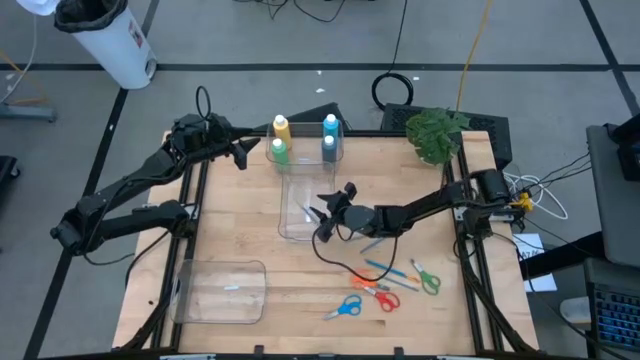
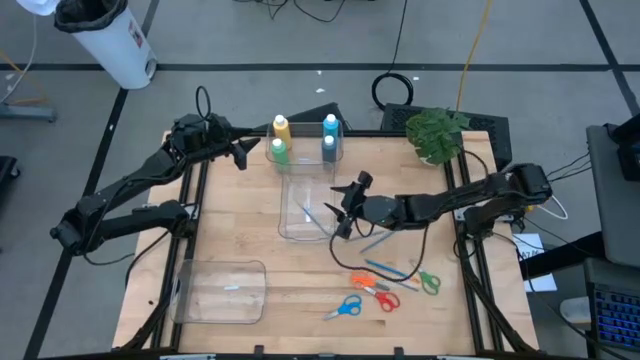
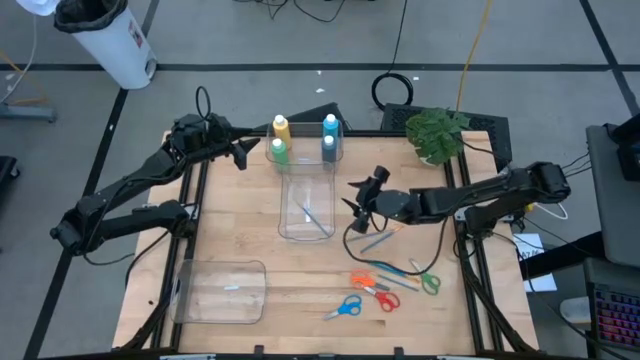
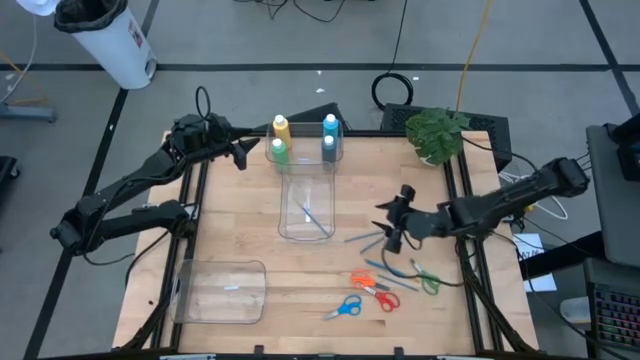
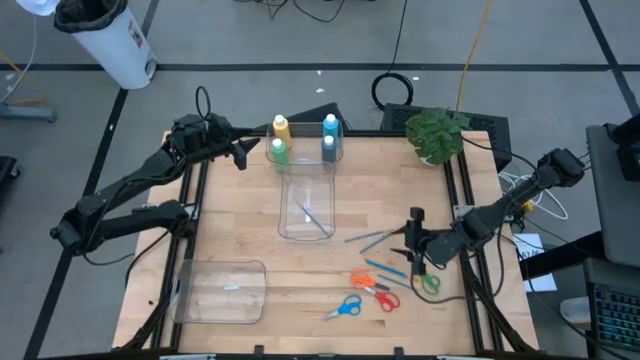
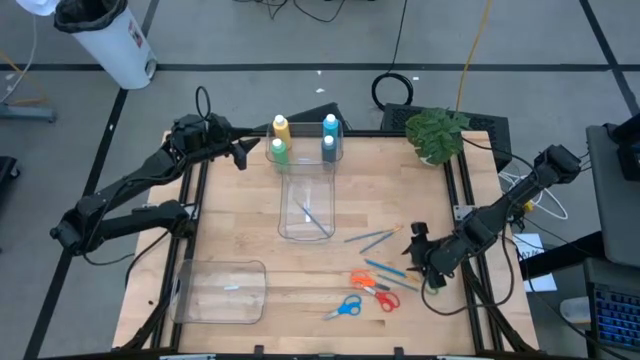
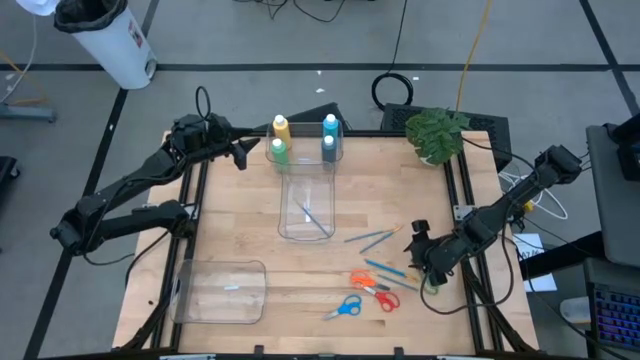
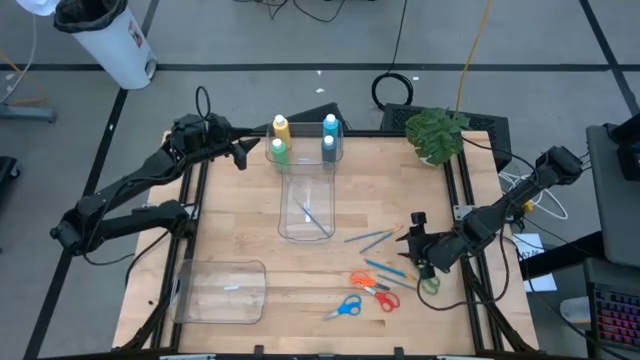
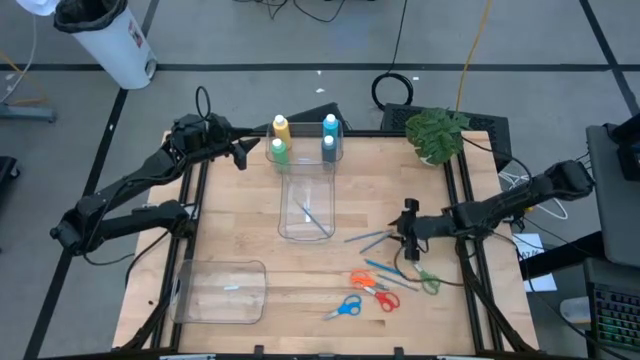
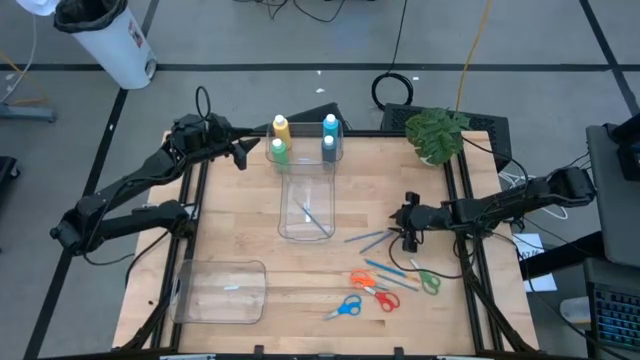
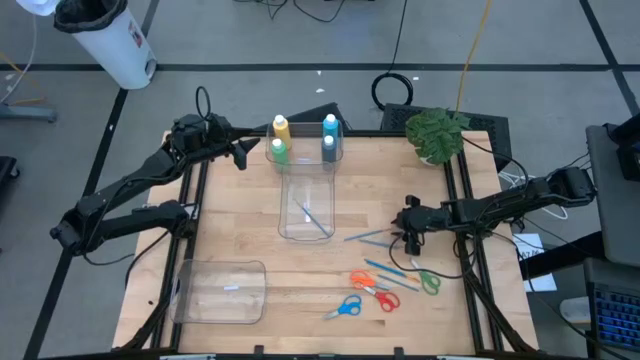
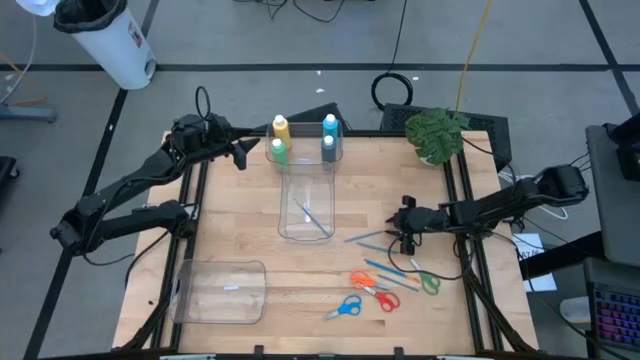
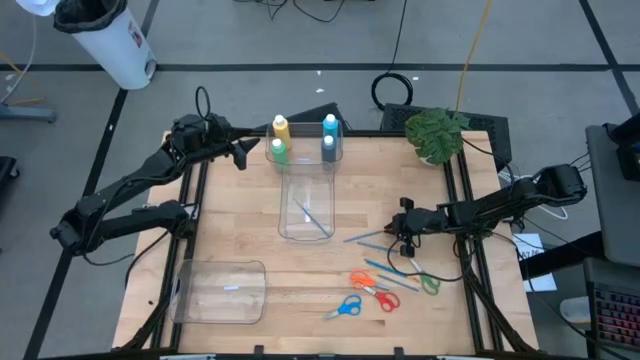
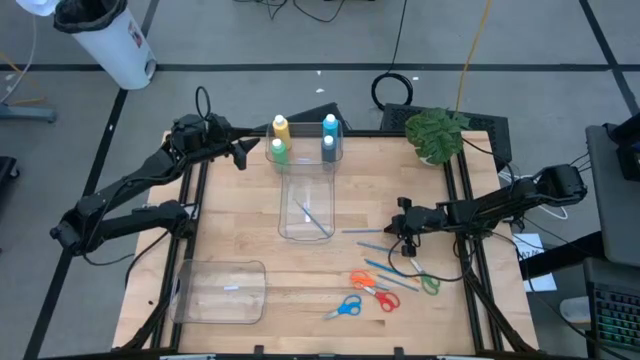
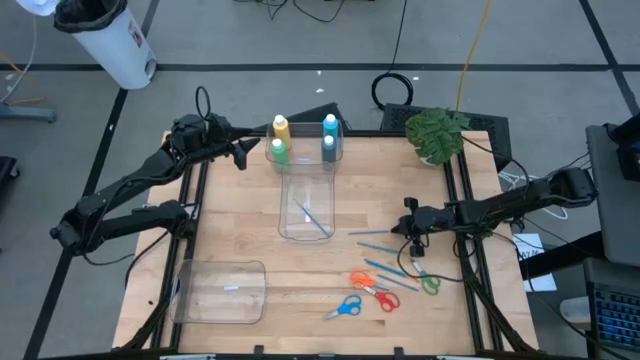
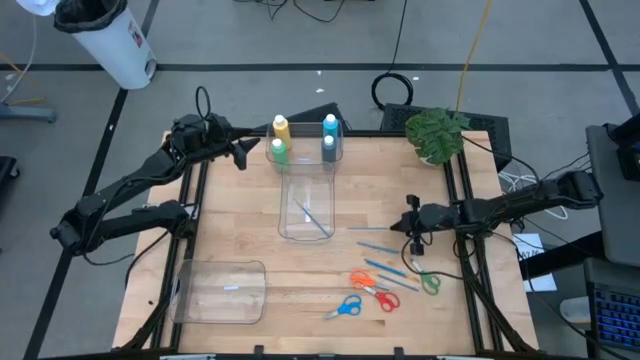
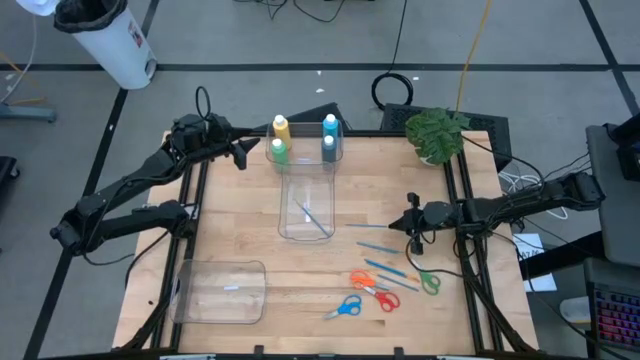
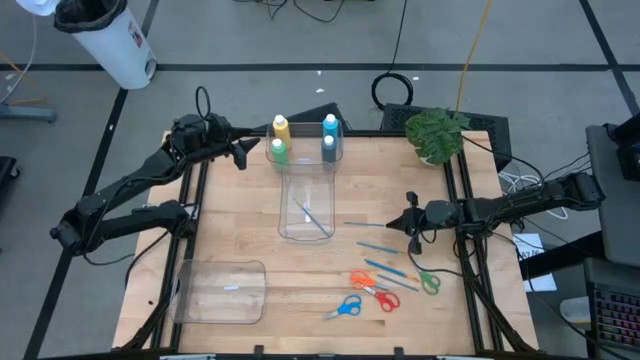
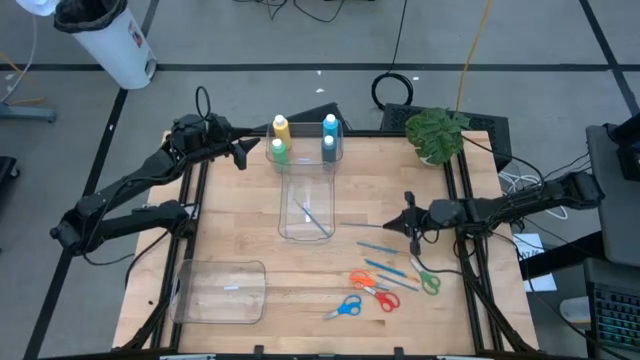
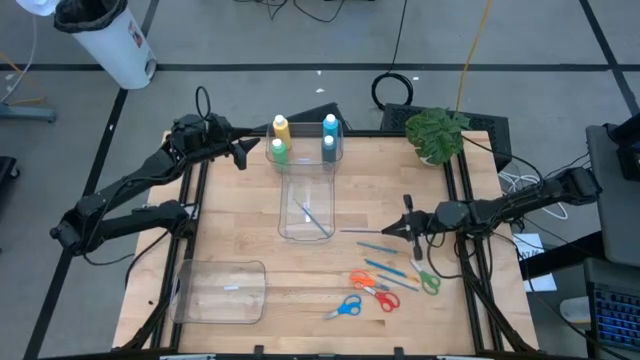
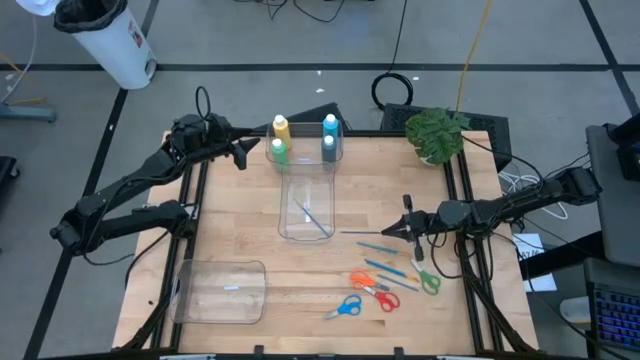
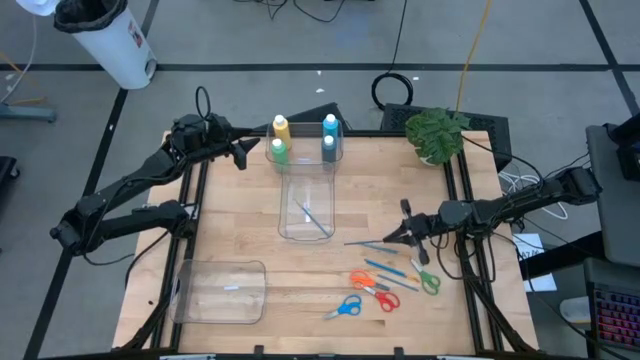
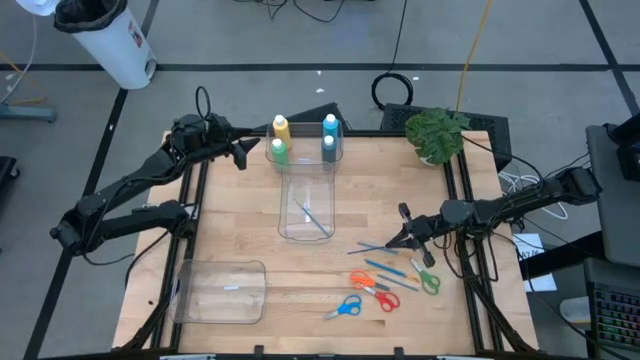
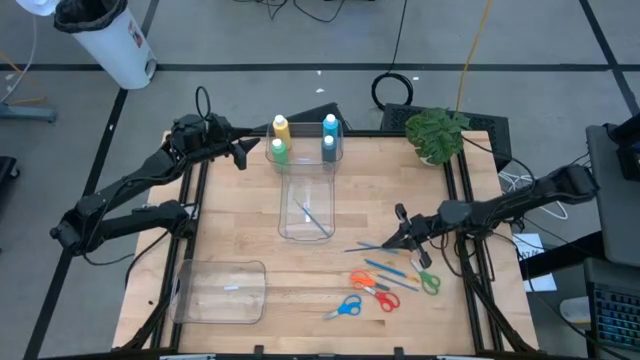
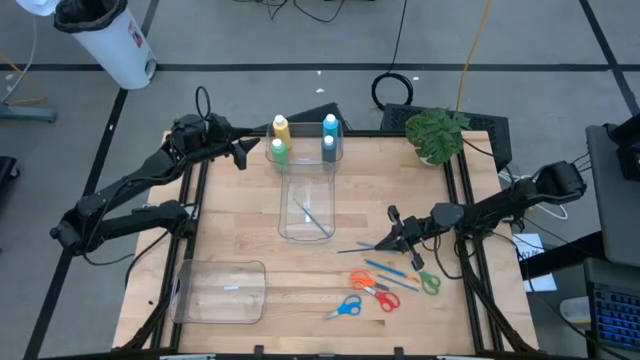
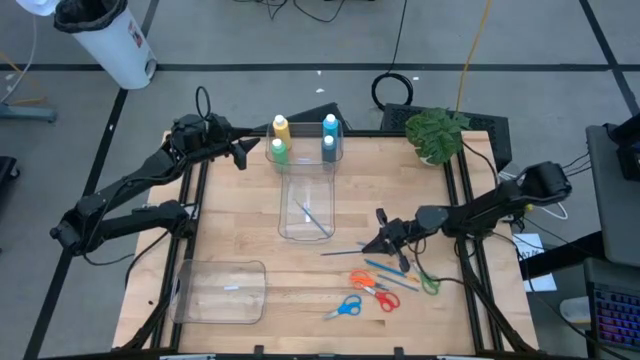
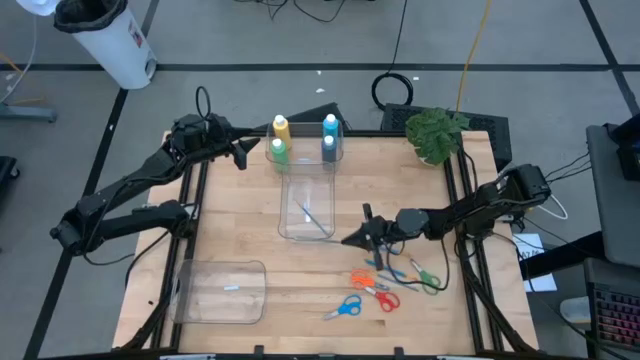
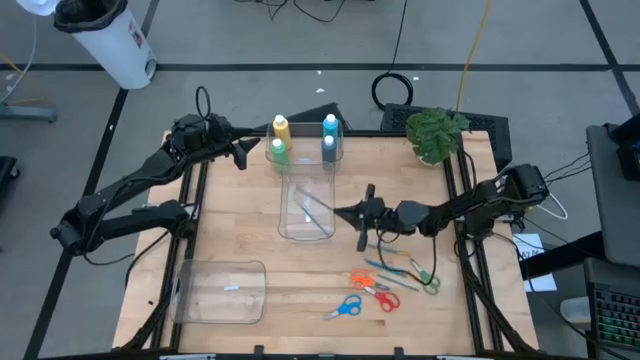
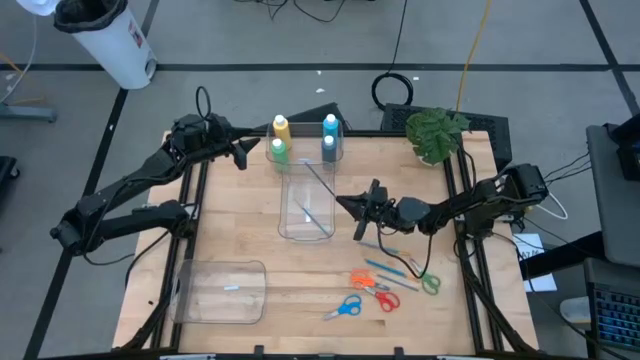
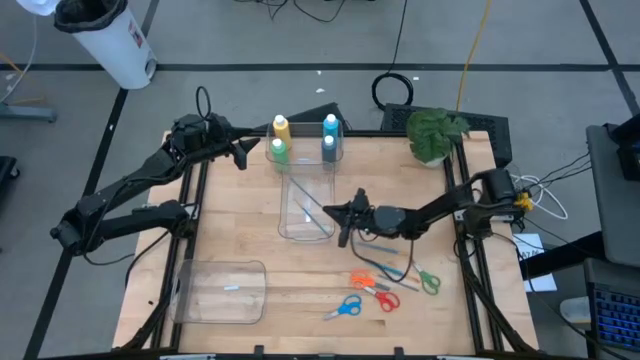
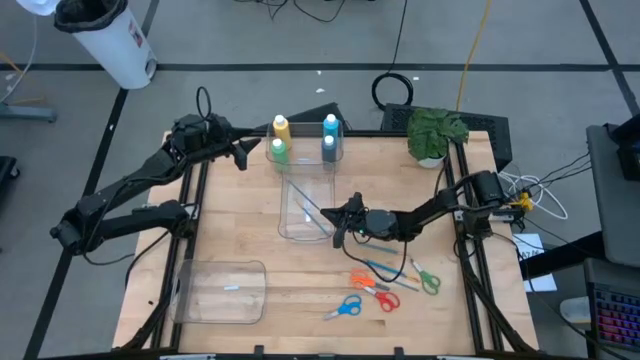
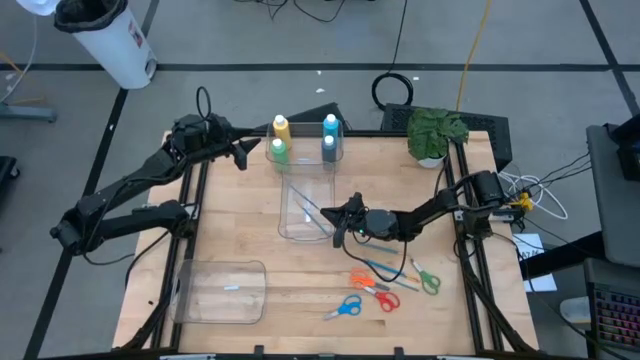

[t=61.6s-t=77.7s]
Task: Pick & Place Paint Supplies
Put the blue paintbrush into the middle transparent bin

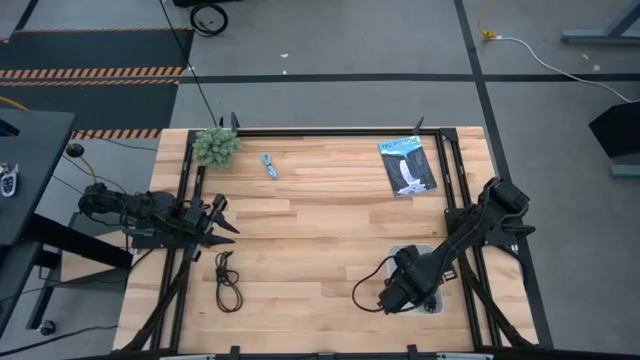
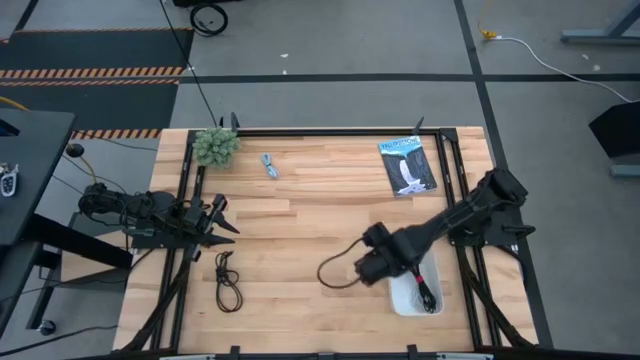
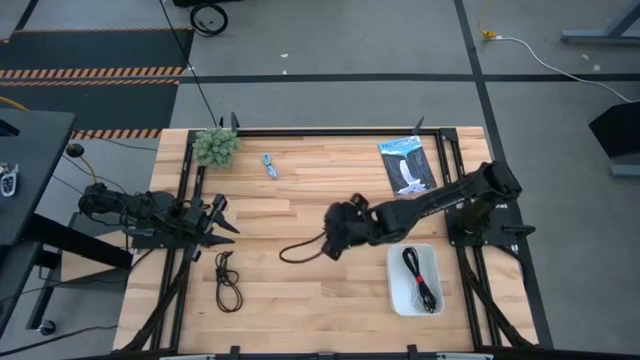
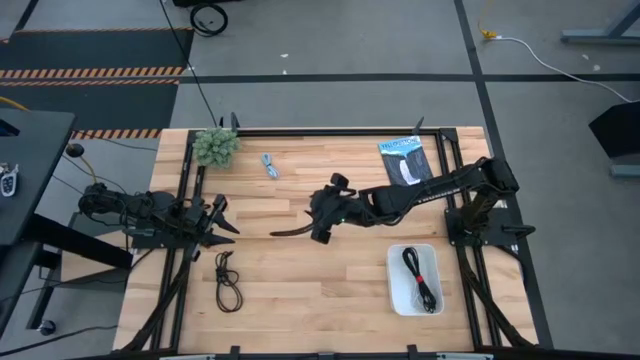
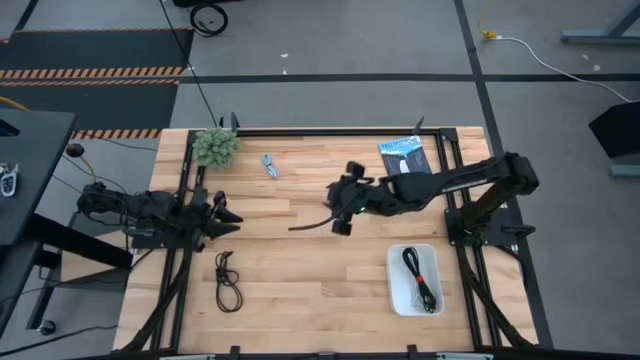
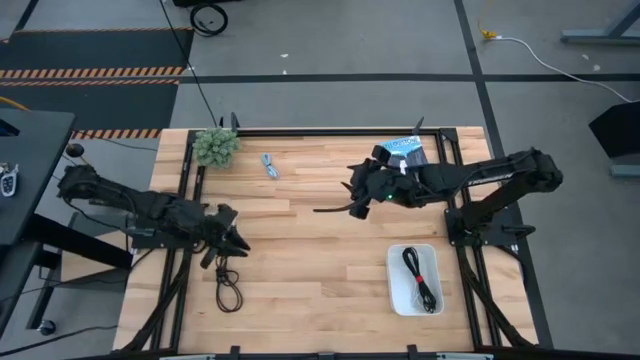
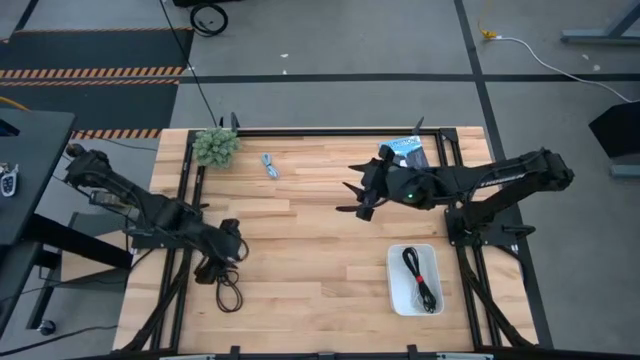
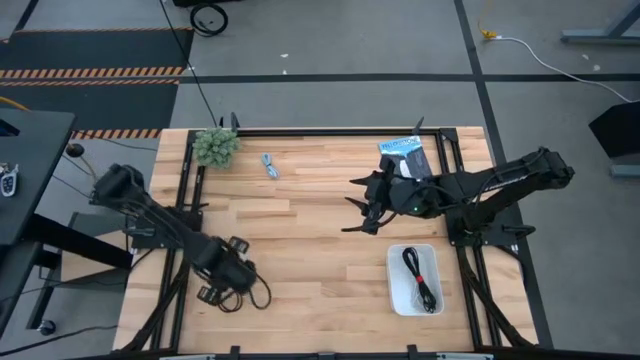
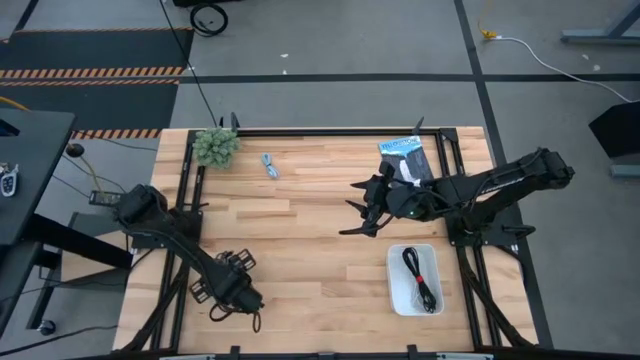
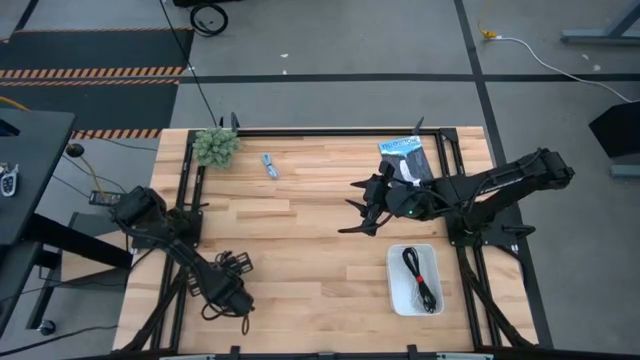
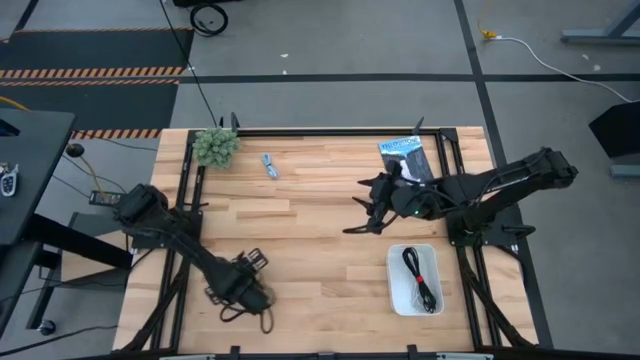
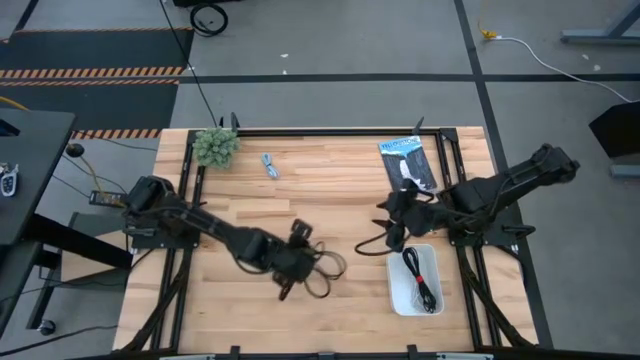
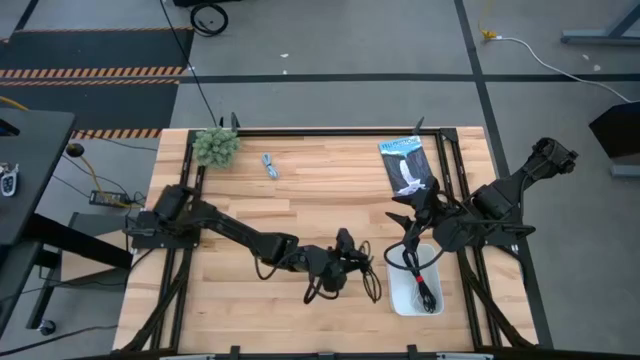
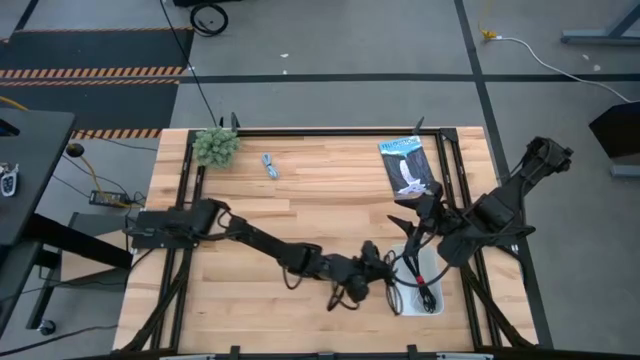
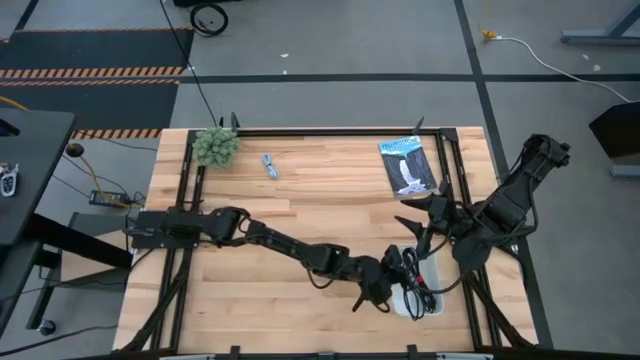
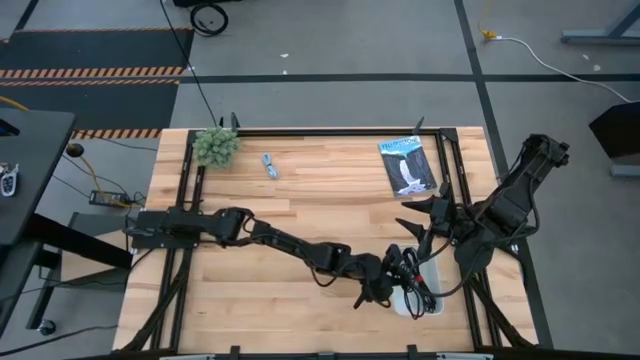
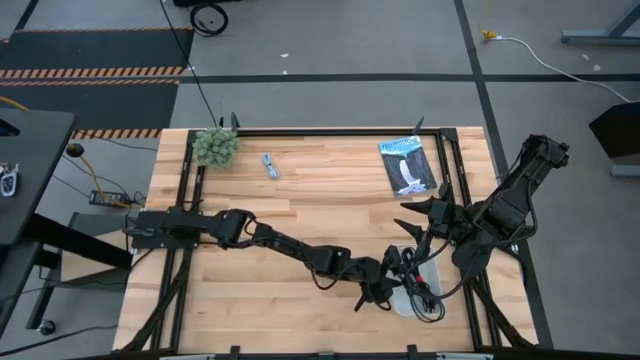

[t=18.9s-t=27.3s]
Task: Pick and place USB-C Cables
Put the black charger cable into the white bin
